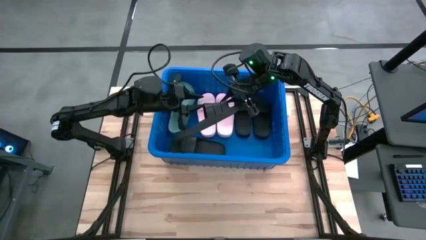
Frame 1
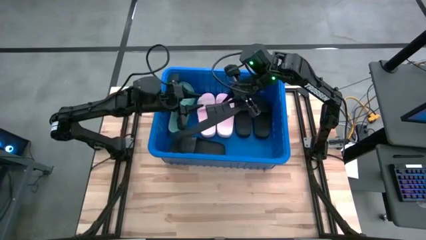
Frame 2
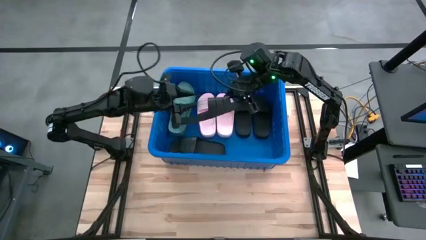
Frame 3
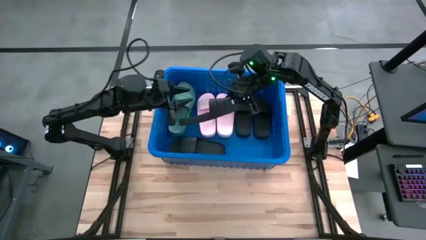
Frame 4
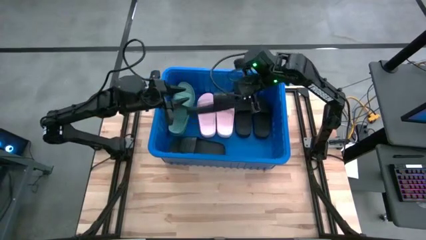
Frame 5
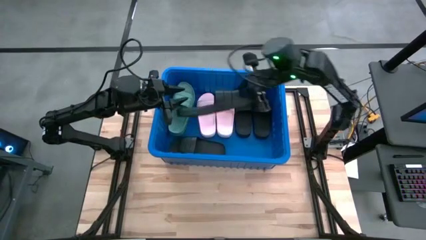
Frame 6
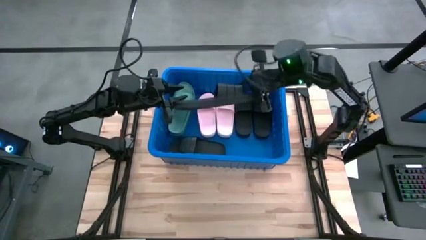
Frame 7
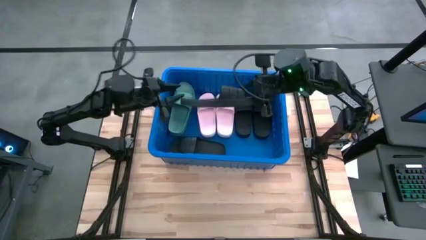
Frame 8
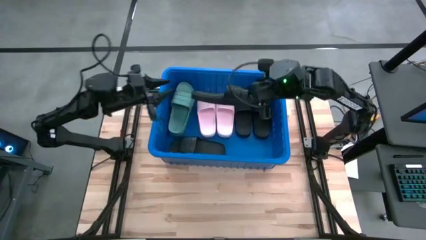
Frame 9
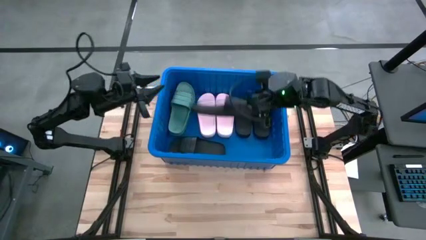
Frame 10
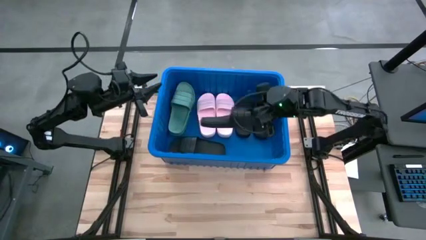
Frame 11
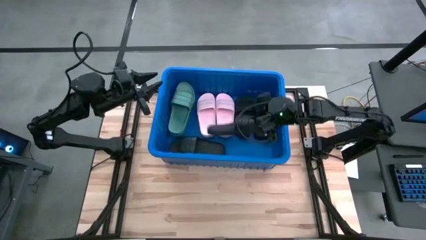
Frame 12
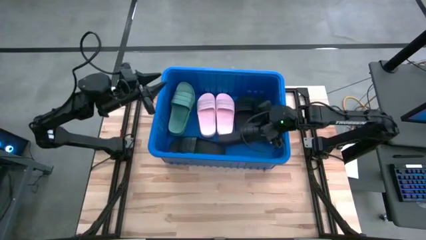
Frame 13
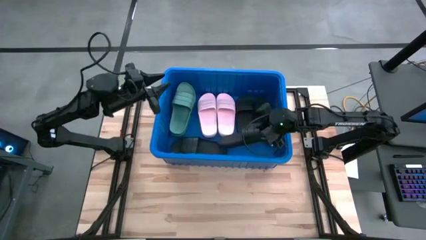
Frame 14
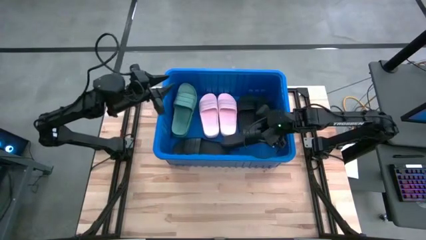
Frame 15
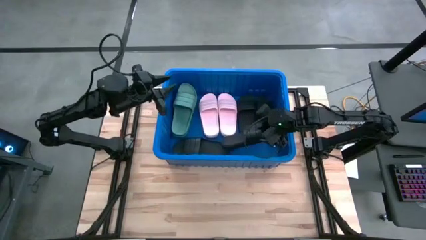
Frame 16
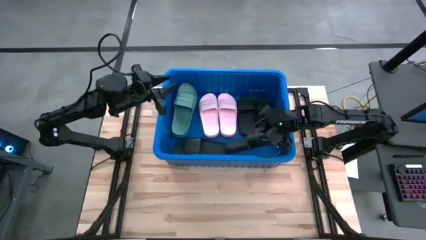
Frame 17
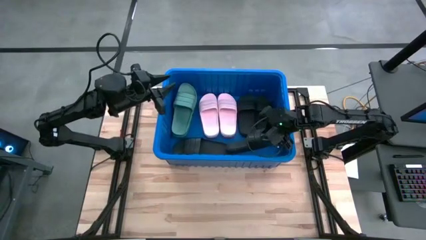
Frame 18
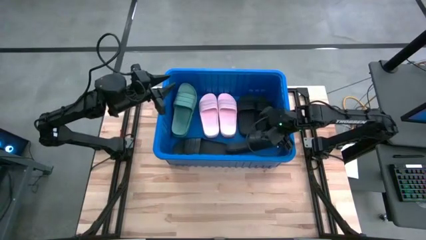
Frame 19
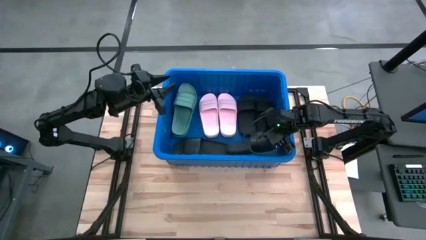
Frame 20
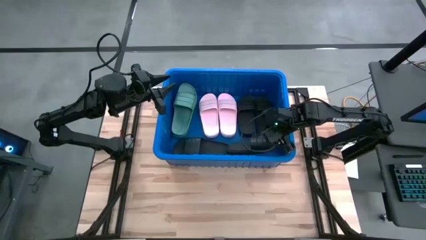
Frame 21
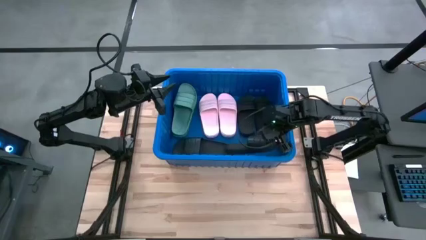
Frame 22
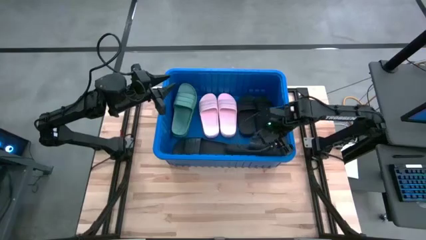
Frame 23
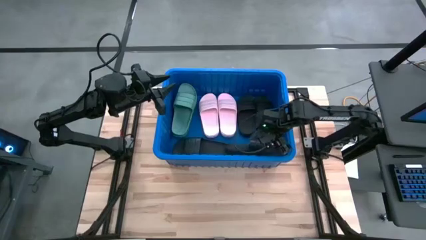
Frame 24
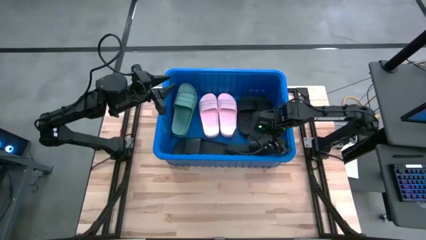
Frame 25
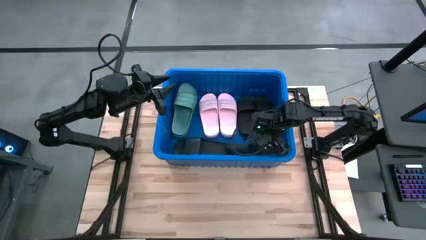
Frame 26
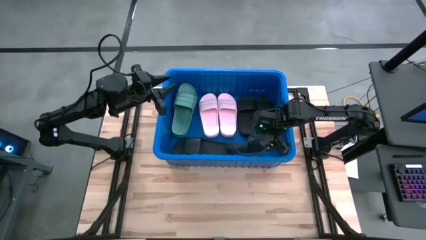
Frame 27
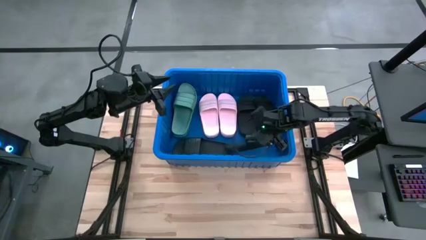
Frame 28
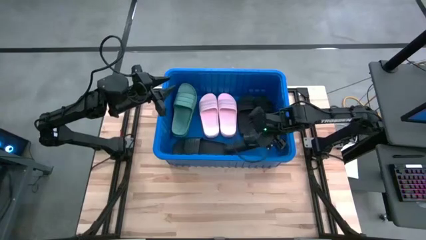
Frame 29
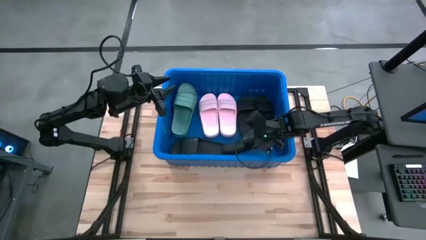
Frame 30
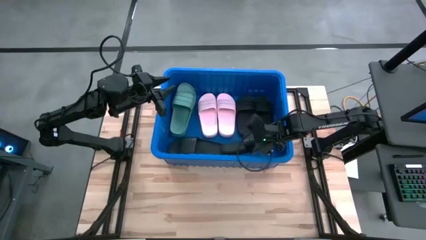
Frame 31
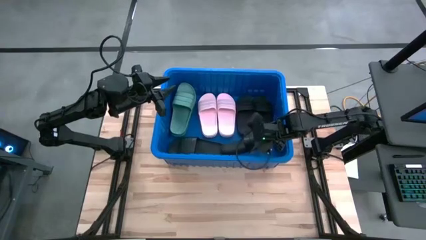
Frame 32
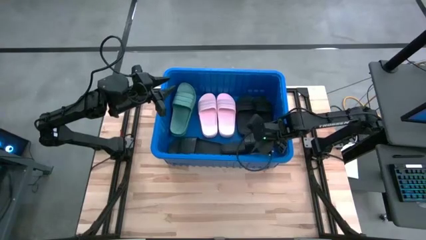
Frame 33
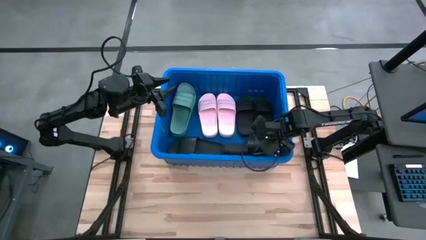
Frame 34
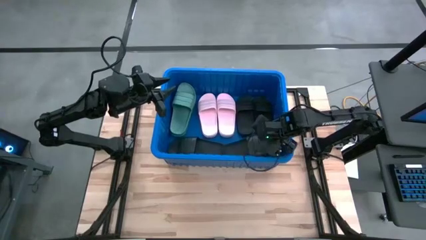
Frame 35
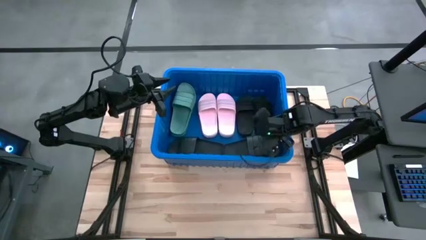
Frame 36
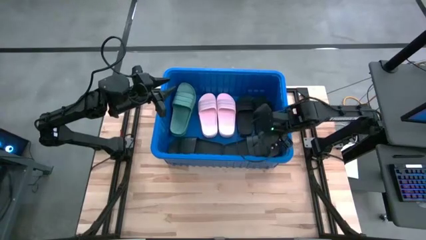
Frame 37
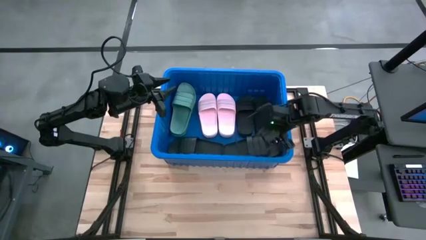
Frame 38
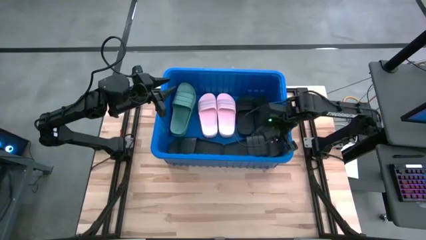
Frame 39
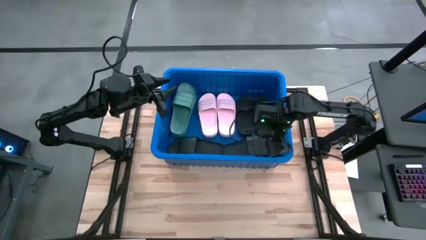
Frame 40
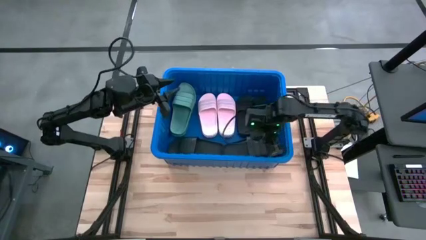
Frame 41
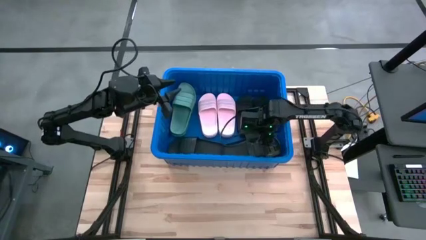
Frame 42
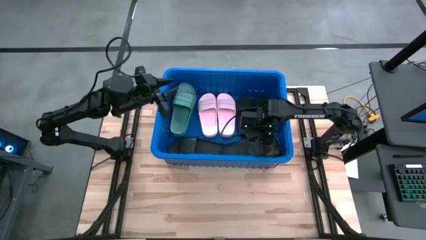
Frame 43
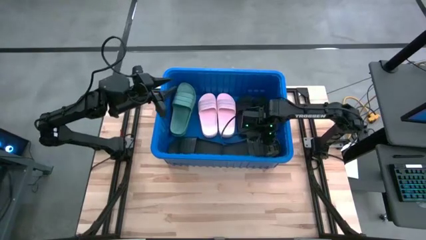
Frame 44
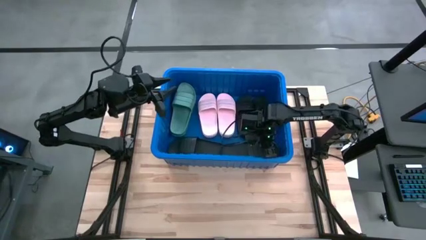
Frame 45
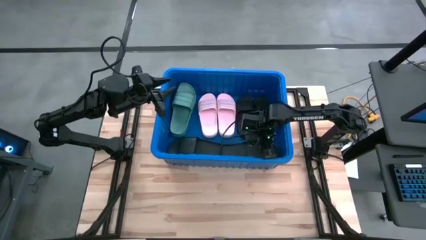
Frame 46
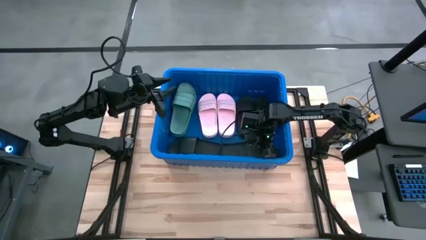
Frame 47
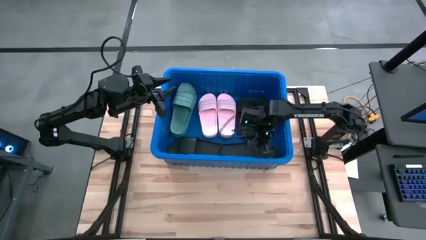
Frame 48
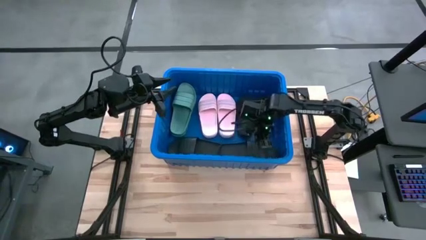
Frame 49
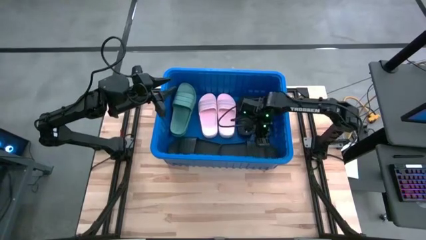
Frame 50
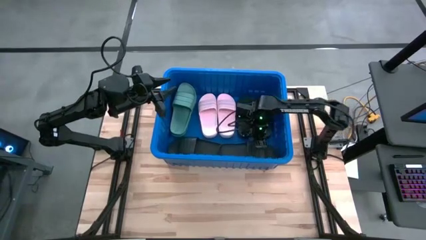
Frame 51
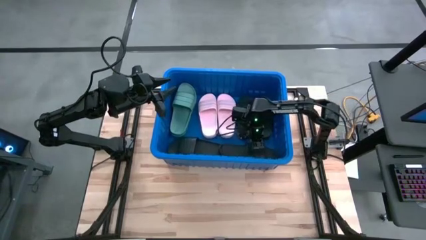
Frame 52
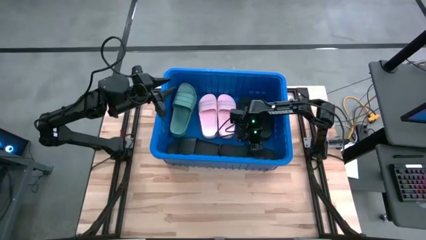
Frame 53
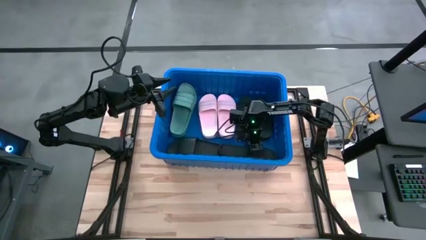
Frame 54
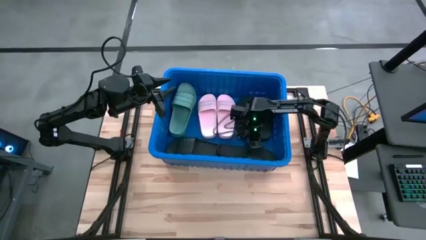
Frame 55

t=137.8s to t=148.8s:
Task: Pick and place slides into bin
Put the black slide into the blue bin
